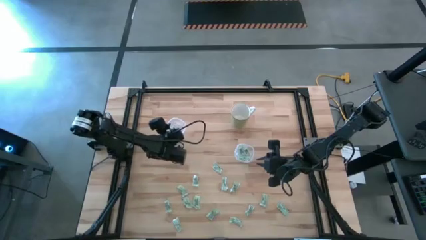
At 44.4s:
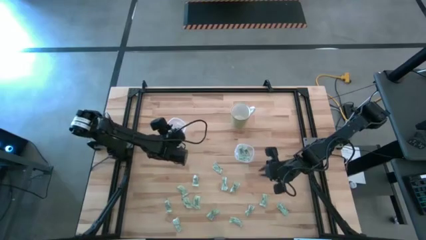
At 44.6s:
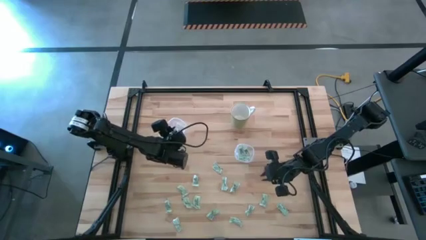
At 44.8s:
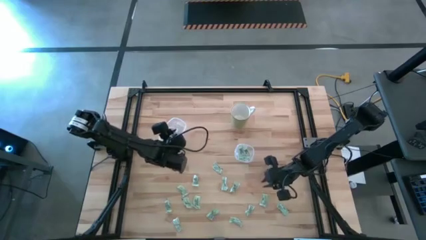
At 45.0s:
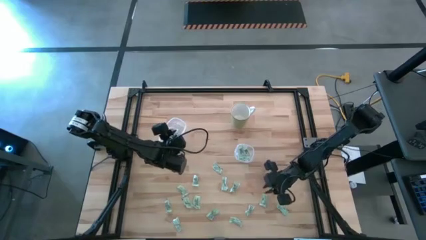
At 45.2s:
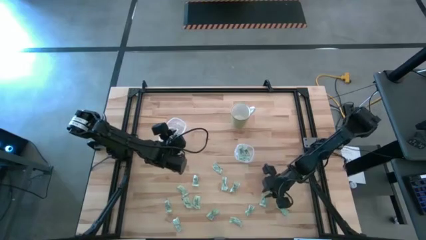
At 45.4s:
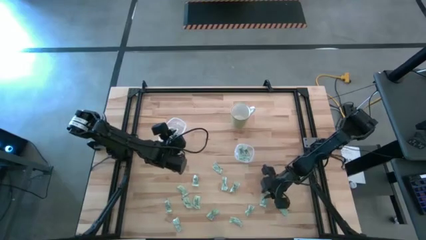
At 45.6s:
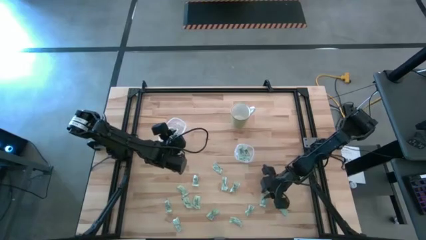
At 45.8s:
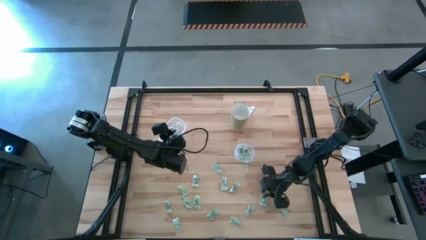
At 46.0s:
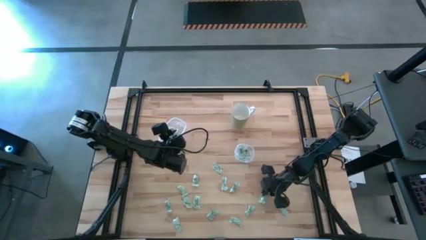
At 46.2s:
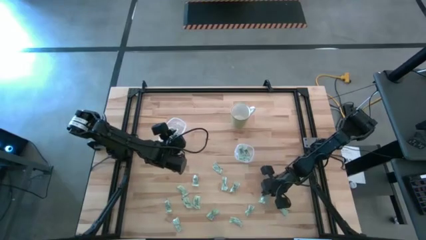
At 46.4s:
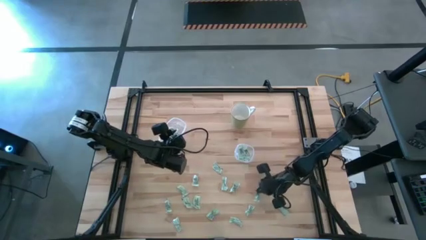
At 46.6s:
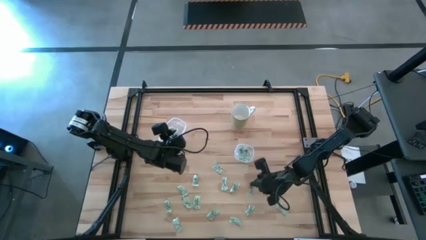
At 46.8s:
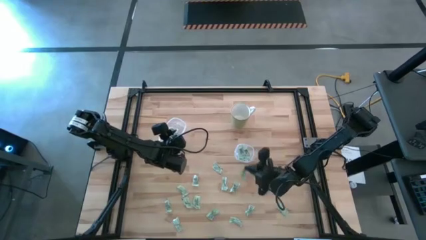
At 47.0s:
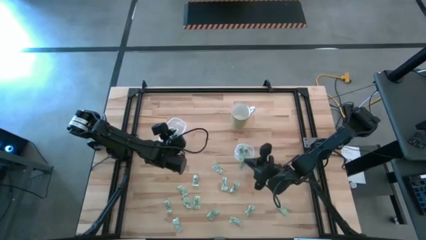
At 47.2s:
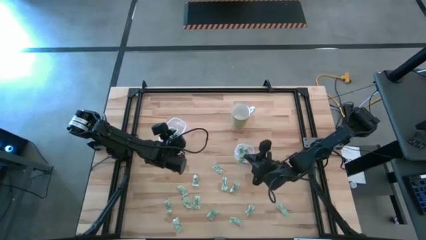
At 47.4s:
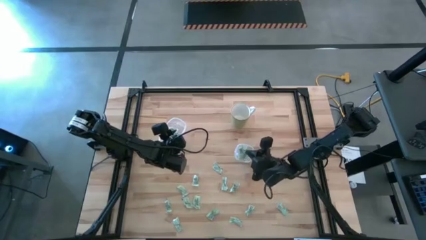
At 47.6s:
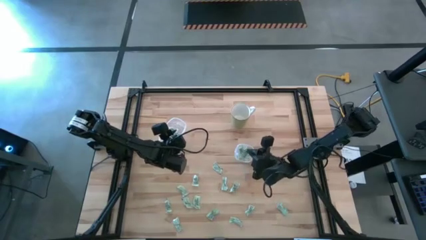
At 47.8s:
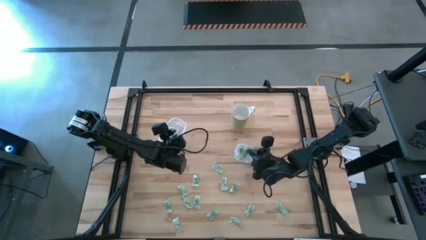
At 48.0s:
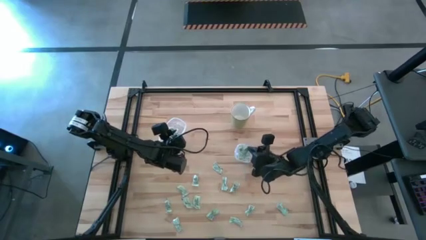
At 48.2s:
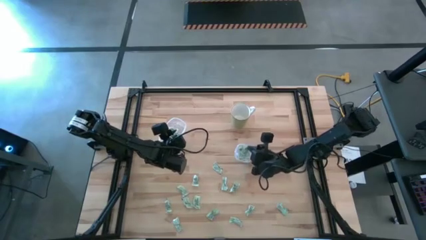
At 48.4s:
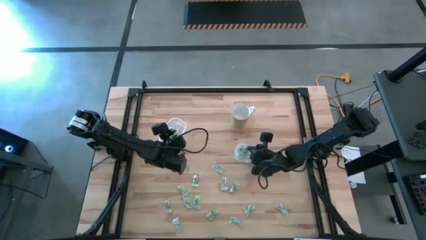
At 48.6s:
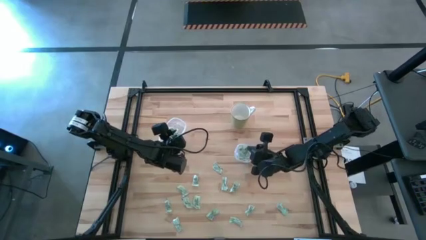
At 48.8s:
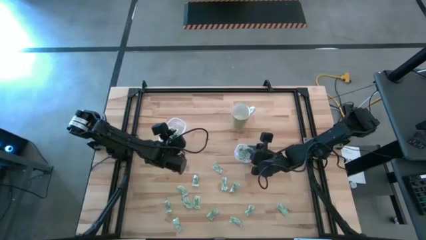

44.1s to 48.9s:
Task: Pick and place Stevia / Truvia into bins
Put the stevia packet into the right transparent container

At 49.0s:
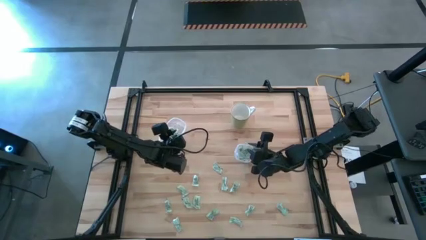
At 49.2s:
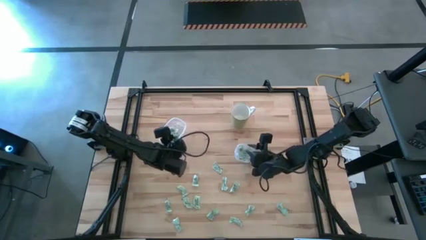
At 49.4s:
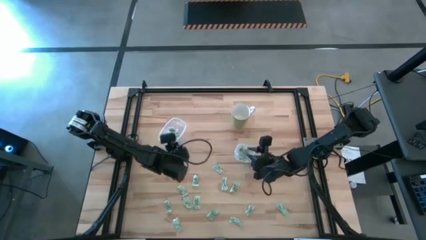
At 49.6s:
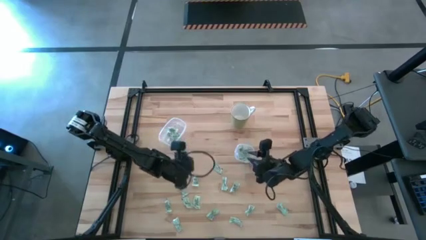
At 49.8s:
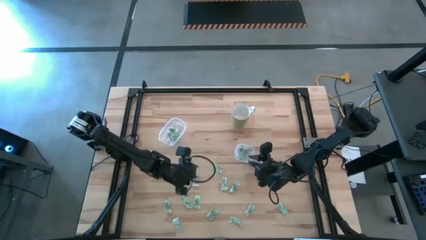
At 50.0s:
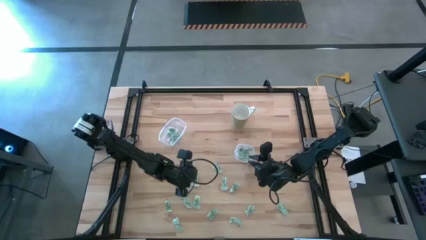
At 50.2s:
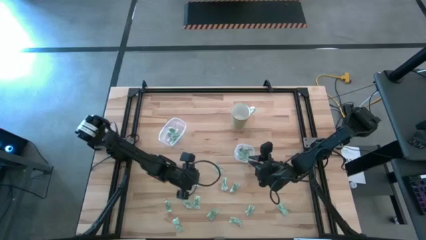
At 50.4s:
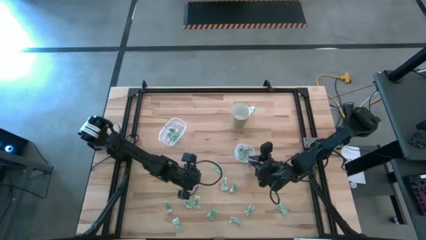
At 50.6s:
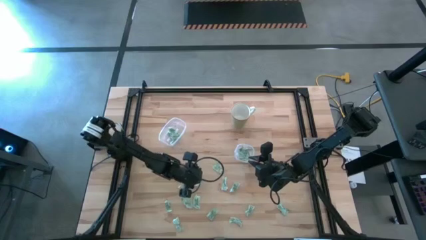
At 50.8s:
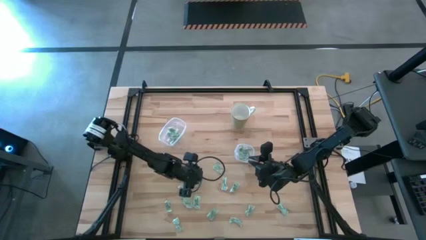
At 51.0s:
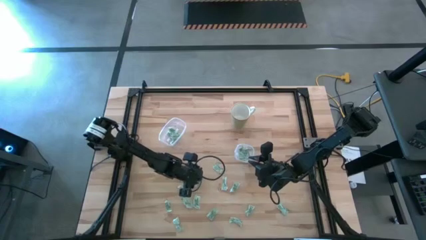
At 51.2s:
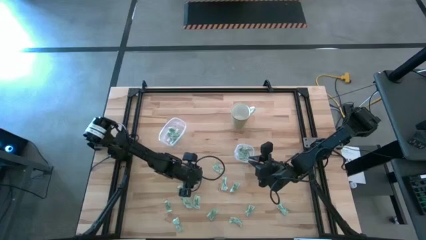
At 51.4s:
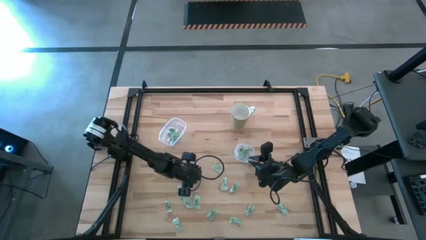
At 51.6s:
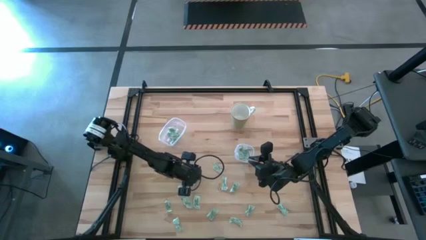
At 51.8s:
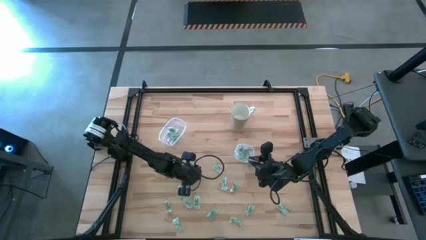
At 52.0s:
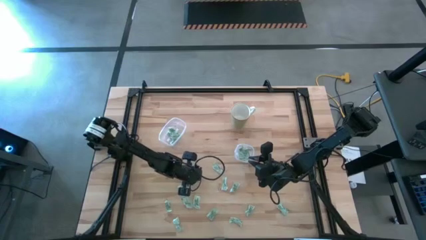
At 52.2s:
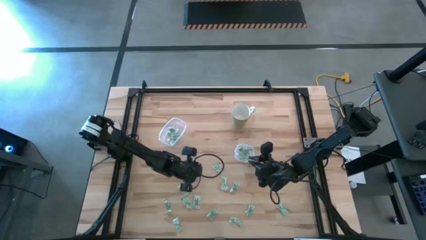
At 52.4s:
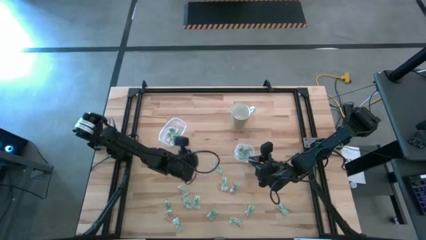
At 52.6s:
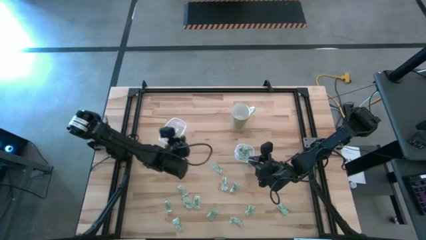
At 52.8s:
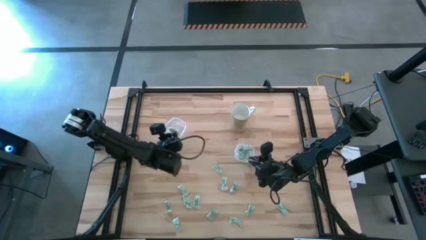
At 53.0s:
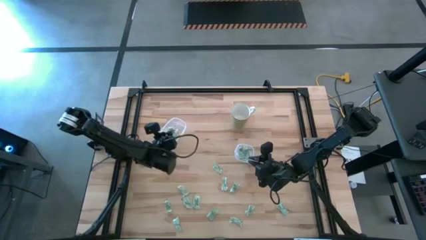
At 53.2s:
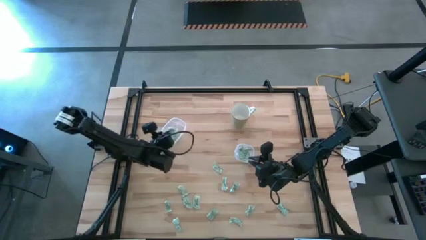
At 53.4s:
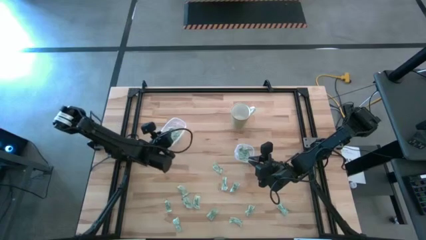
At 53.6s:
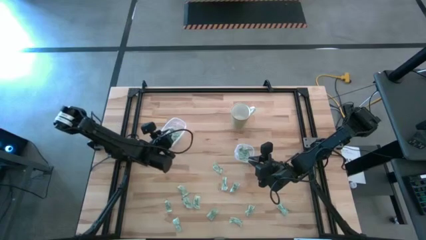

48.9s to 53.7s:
Put the stevia packet into the left transparent container

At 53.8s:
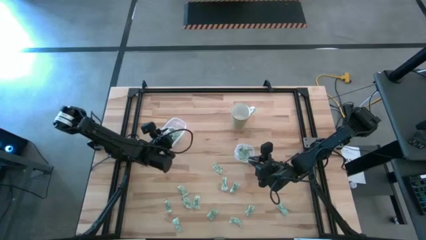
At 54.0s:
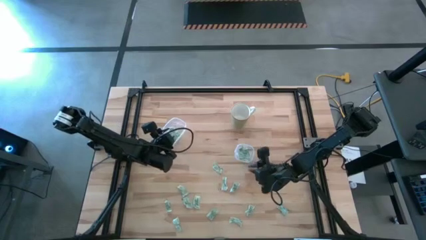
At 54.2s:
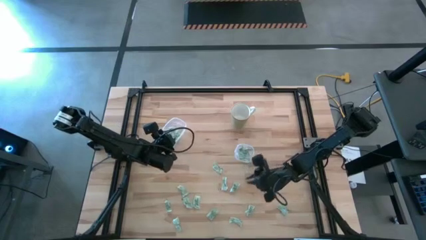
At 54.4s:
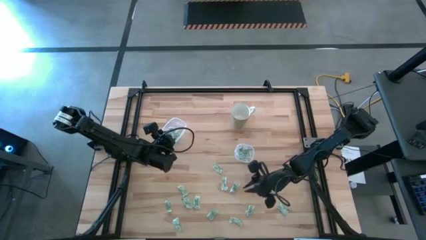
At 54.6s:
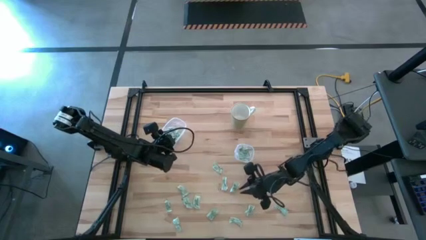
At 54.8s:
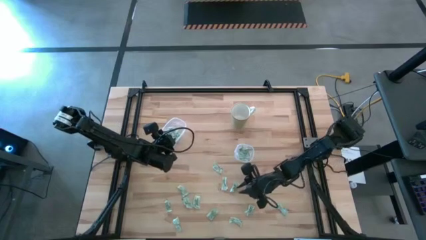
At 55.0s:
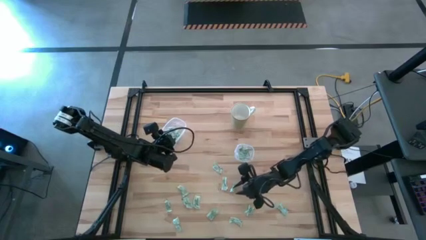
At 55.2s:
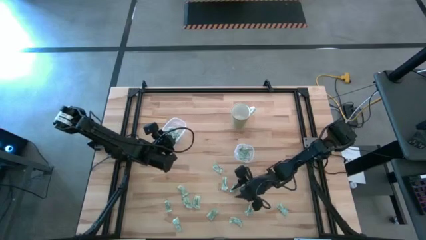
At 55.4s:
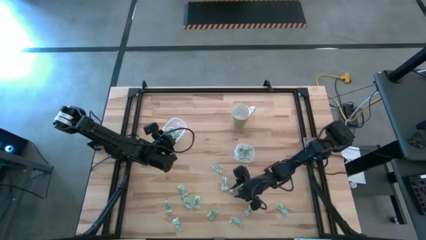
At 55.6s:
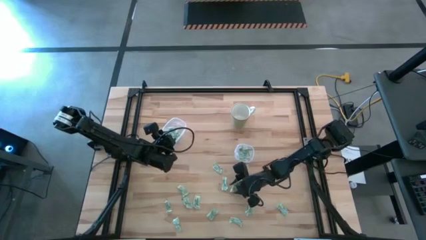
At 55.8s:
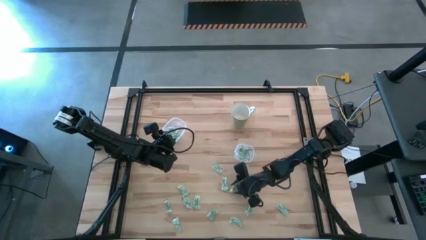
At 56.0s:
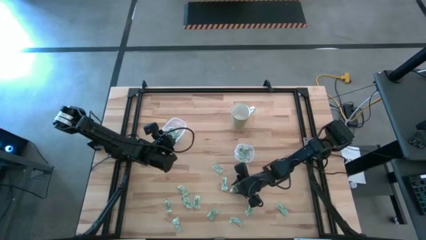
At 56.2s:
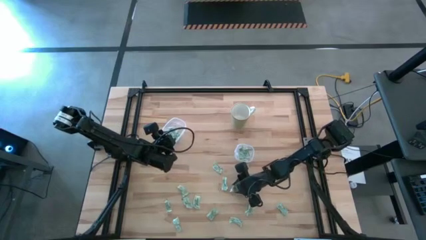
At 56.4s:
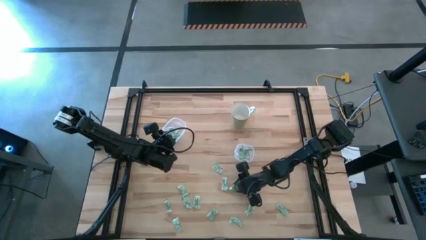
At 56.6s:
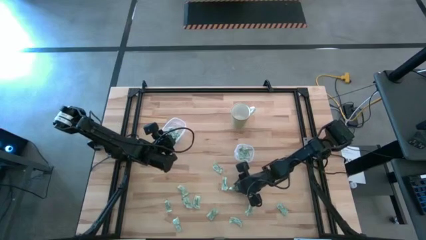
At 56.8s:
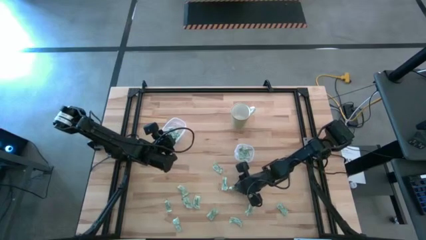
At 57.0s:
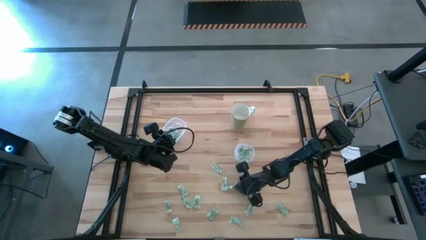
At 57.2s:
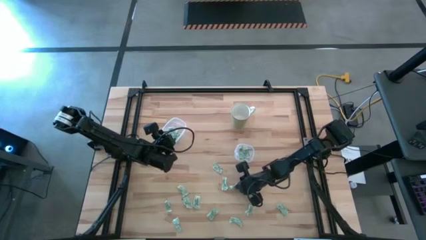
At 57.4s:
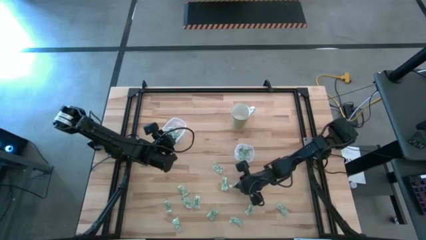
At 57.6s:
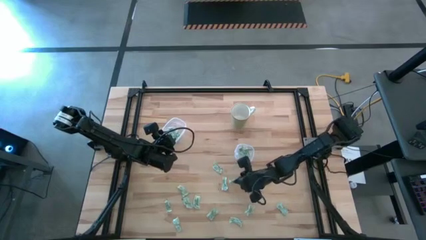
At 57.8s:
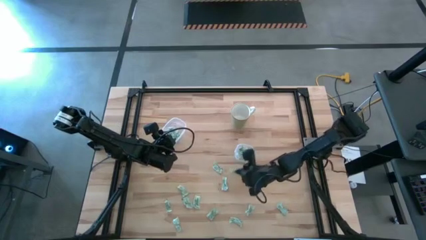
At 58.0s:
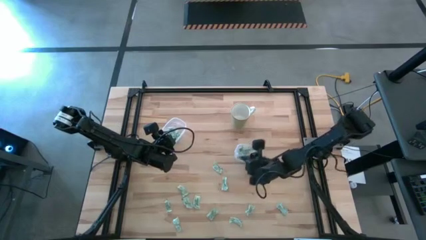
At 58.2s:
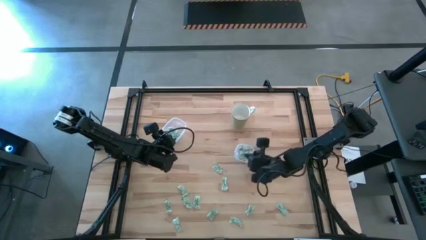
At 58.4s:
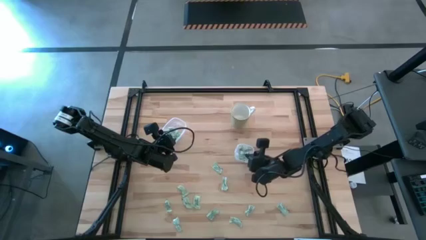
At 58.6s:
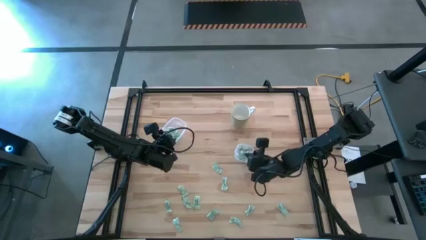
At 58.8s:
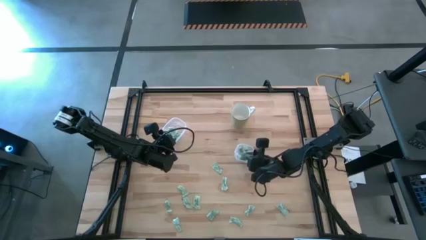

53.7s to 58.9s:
Put the stevia packet into the right transparent container

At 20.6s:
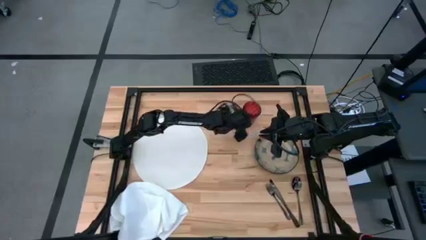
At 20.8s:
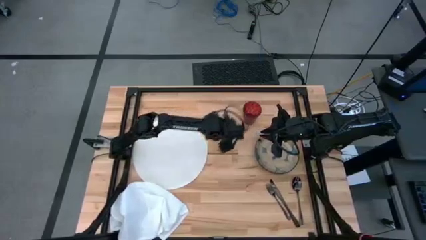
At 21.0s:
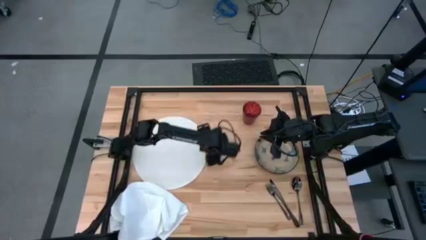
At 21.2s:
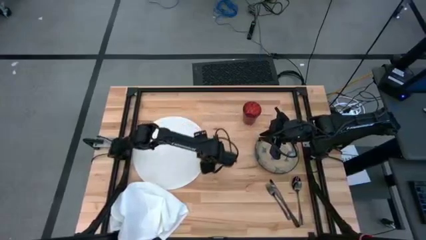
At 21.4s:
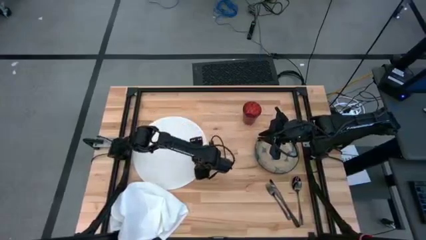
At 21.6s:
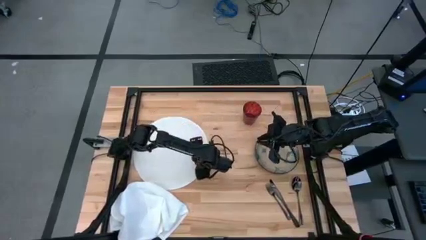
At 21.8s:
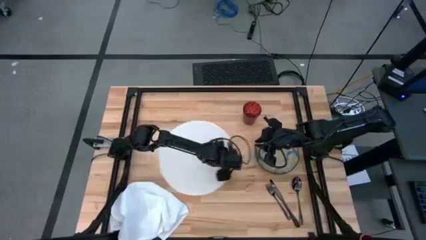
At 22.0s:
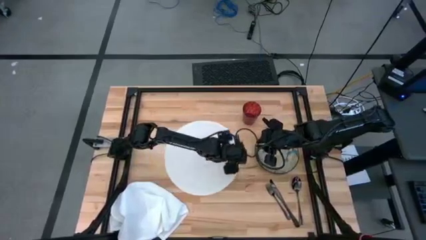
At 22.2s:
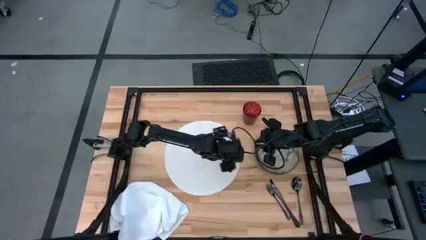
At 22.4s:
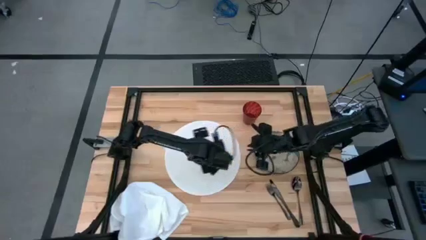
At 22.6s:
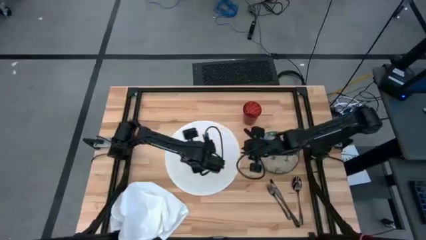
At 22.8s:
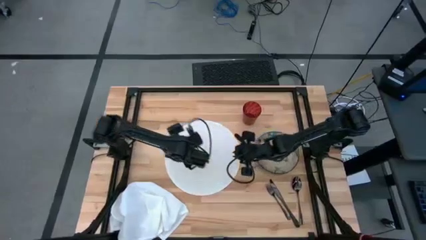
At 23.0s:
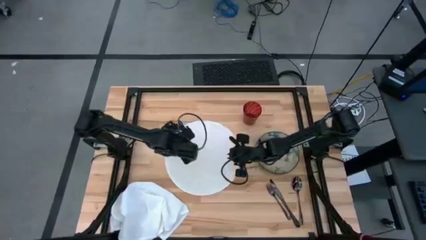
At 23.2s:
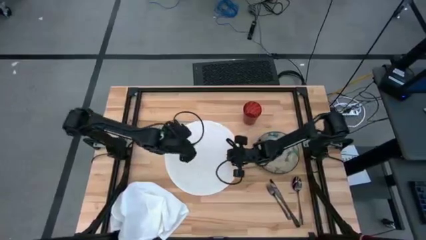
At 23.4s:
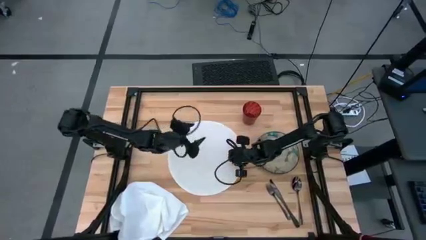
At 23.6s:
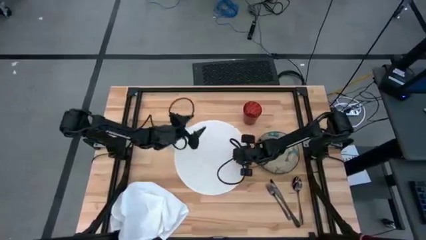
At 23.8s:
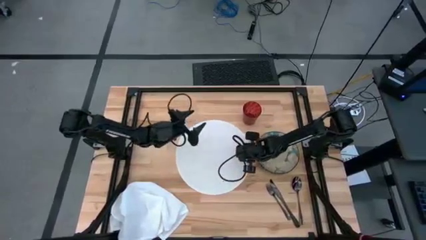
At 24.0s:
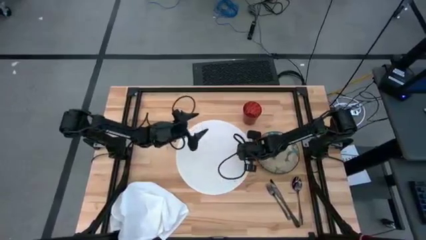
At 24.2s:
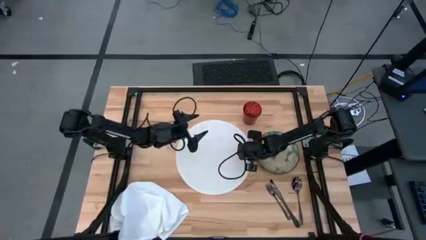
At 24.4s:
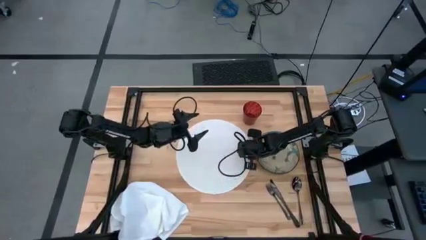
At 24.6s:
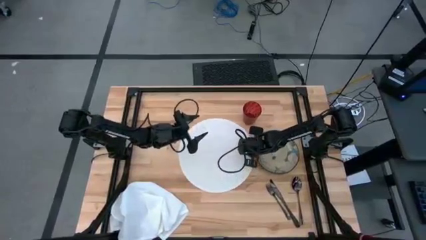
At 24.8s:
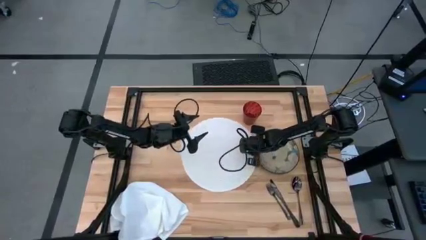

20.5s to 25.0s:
Task: Set table place
Adjust the white table placemat
